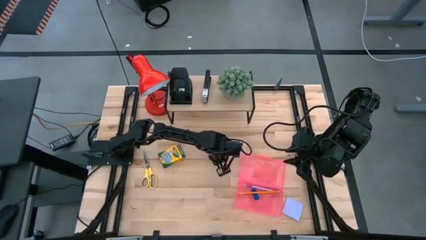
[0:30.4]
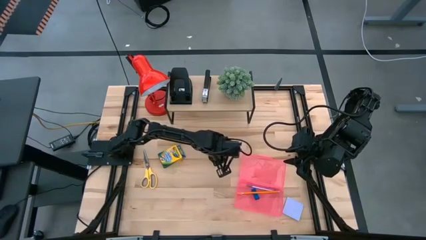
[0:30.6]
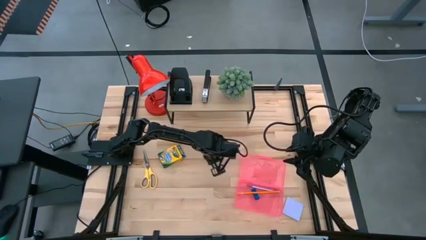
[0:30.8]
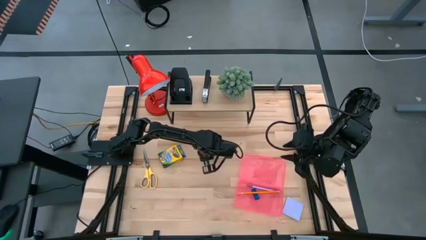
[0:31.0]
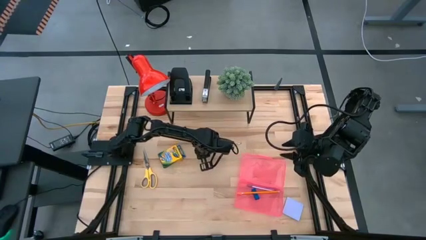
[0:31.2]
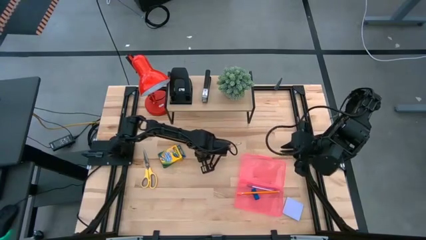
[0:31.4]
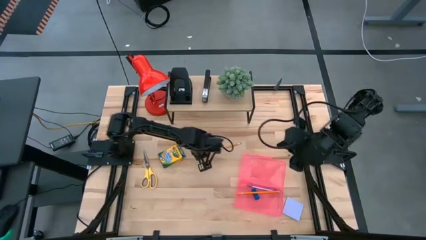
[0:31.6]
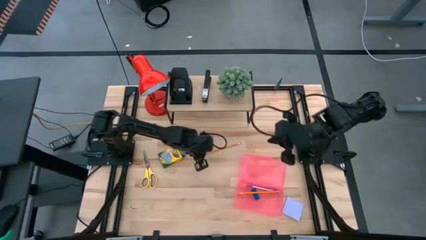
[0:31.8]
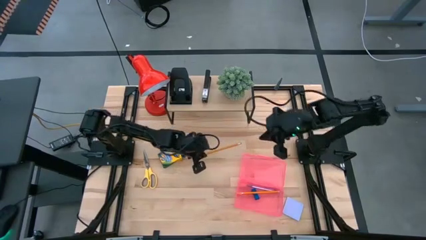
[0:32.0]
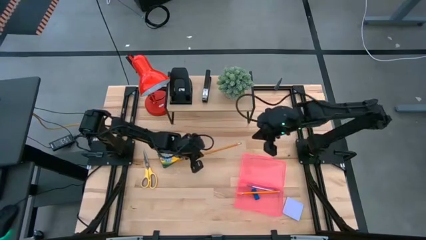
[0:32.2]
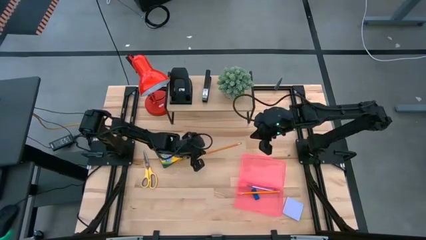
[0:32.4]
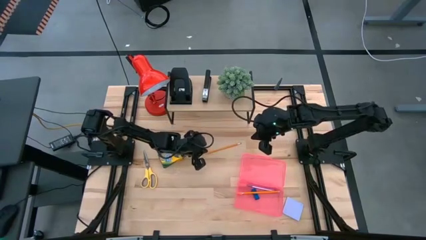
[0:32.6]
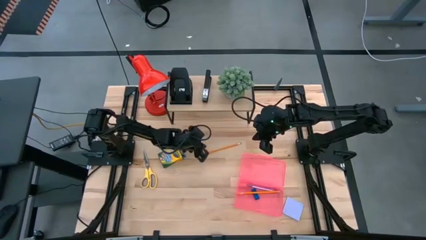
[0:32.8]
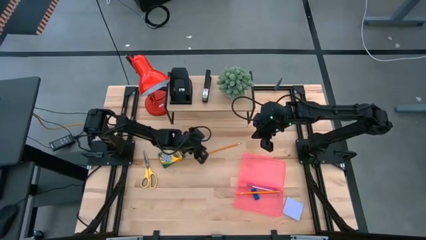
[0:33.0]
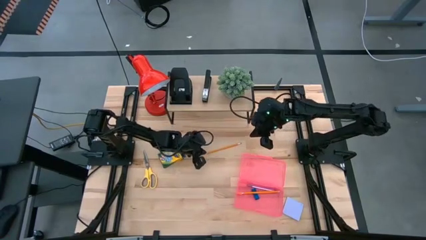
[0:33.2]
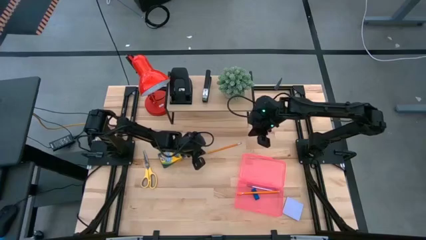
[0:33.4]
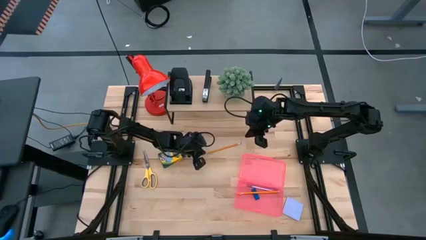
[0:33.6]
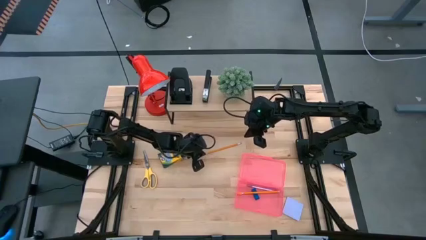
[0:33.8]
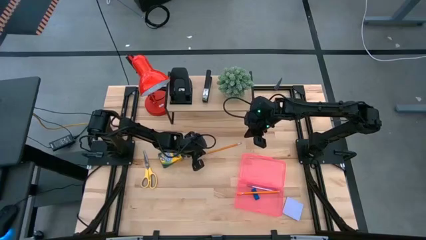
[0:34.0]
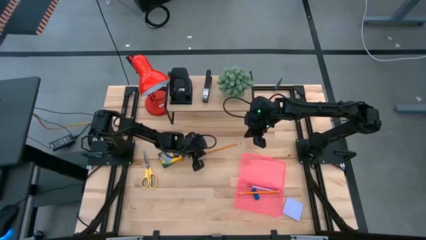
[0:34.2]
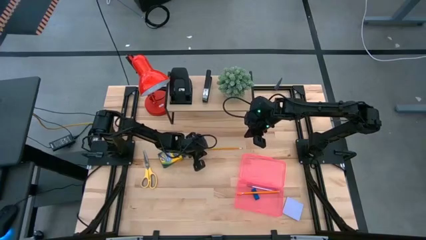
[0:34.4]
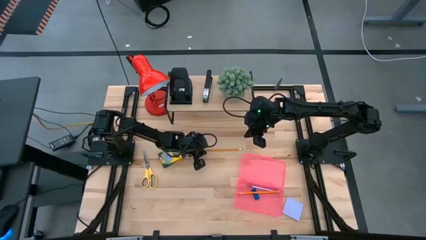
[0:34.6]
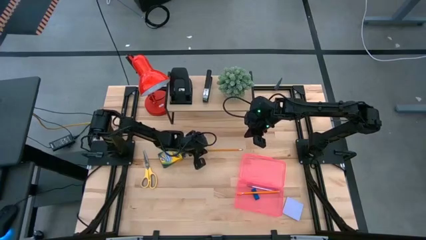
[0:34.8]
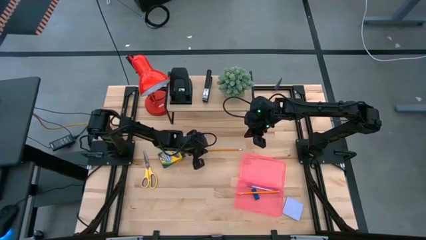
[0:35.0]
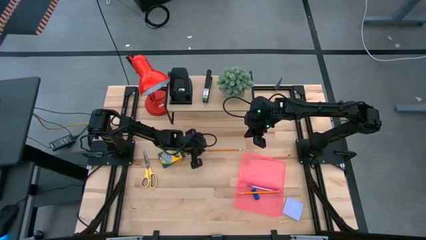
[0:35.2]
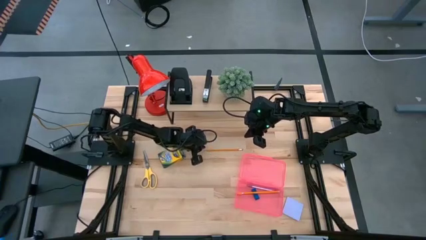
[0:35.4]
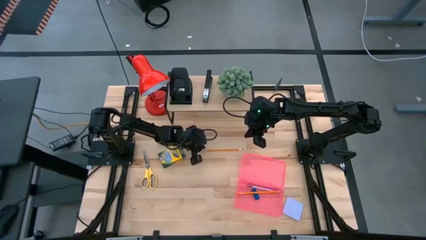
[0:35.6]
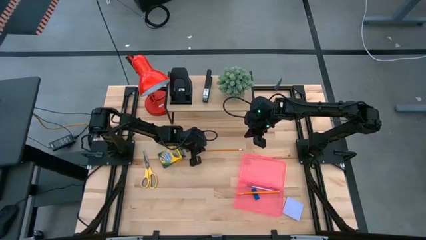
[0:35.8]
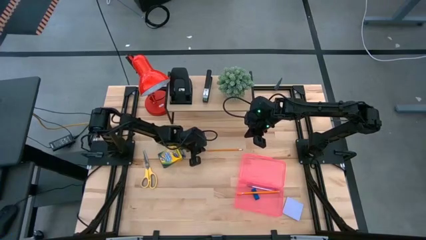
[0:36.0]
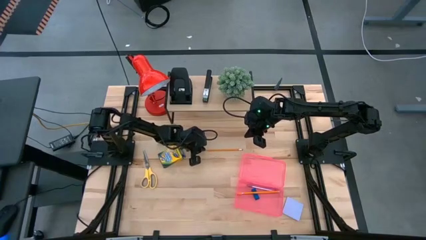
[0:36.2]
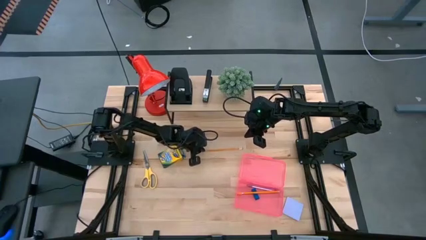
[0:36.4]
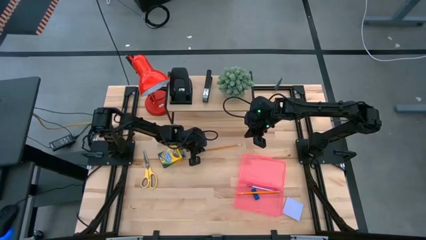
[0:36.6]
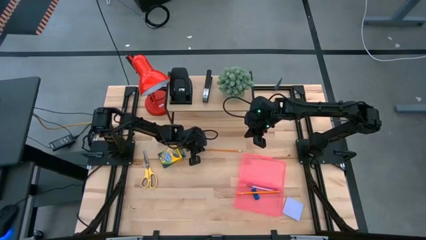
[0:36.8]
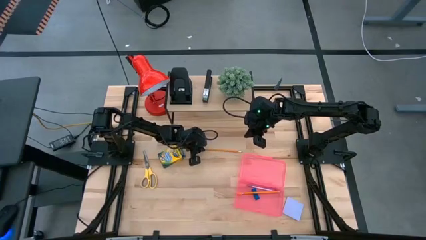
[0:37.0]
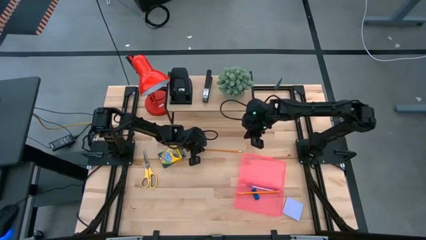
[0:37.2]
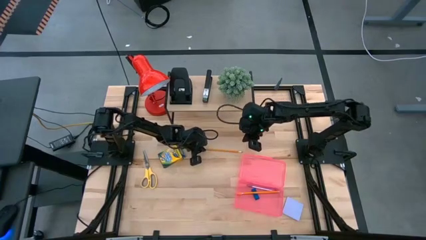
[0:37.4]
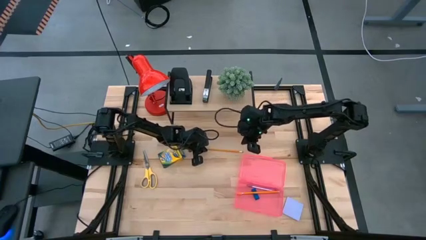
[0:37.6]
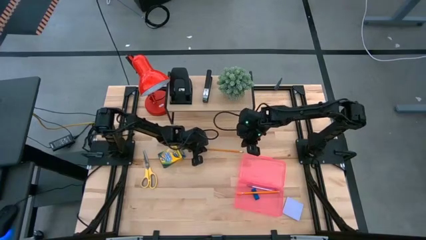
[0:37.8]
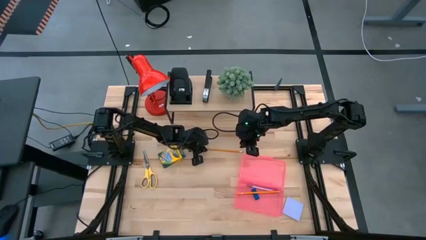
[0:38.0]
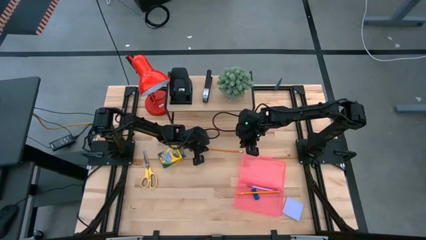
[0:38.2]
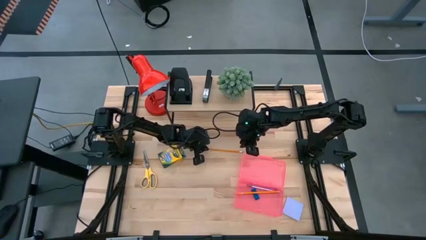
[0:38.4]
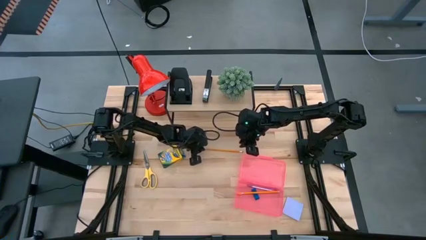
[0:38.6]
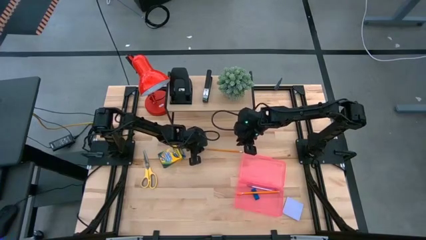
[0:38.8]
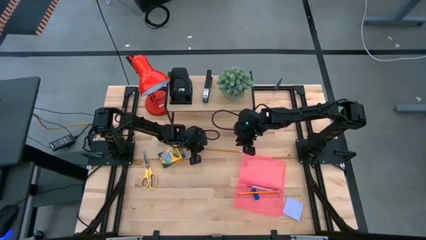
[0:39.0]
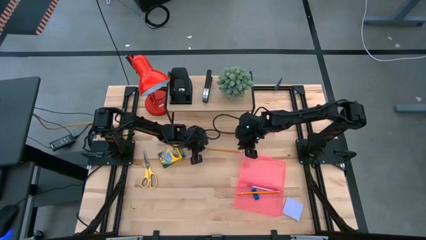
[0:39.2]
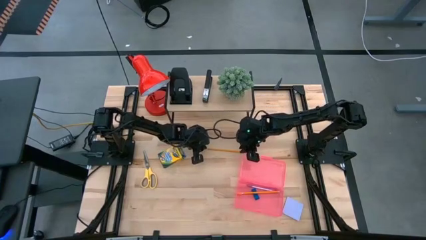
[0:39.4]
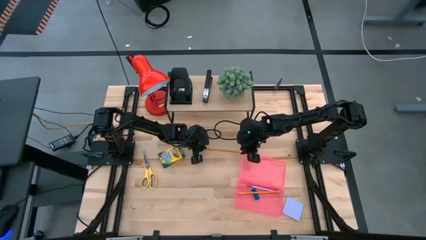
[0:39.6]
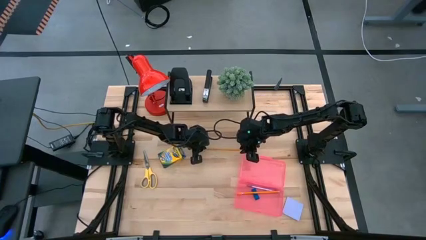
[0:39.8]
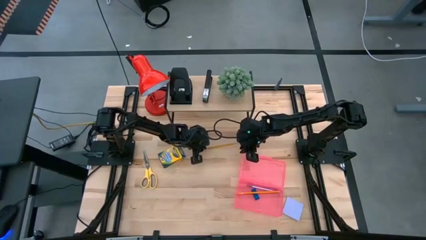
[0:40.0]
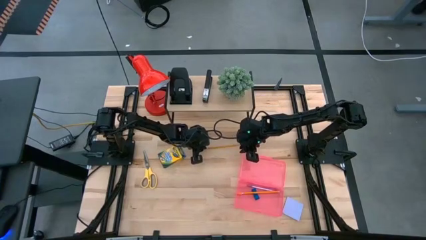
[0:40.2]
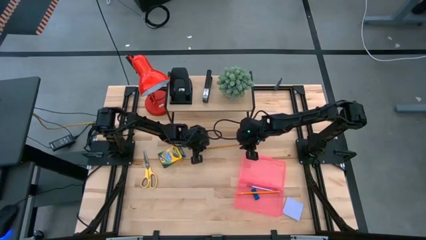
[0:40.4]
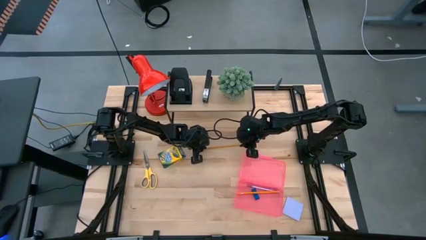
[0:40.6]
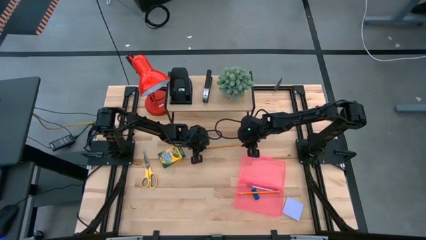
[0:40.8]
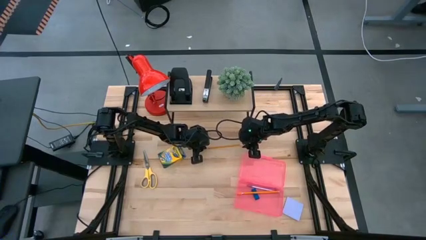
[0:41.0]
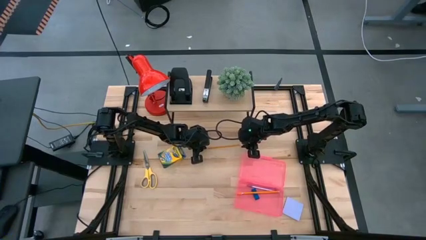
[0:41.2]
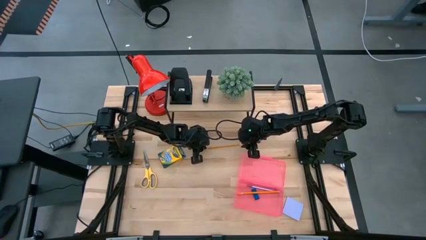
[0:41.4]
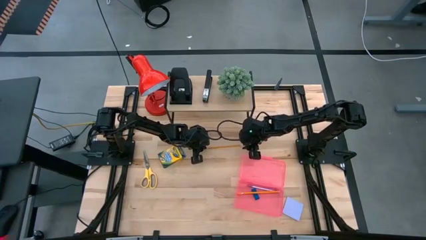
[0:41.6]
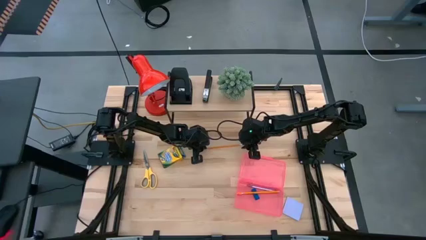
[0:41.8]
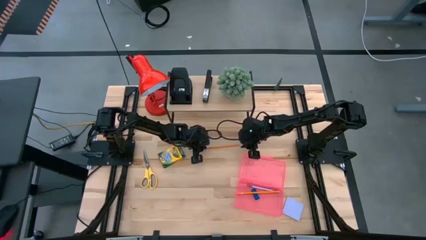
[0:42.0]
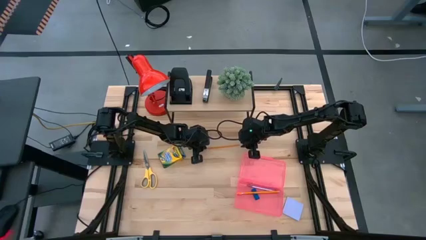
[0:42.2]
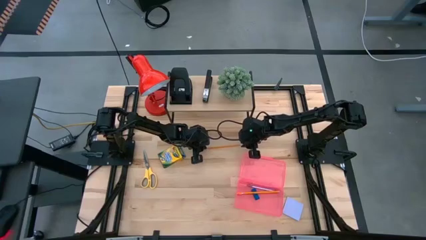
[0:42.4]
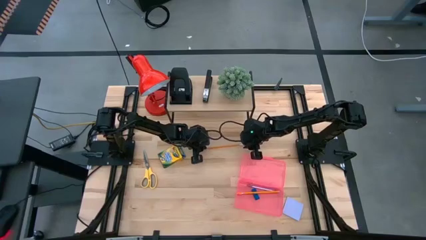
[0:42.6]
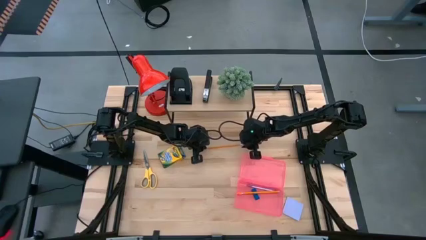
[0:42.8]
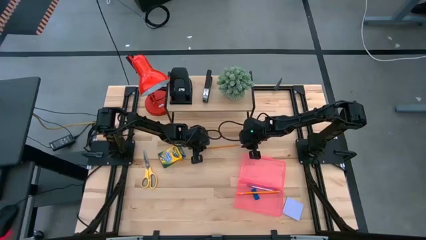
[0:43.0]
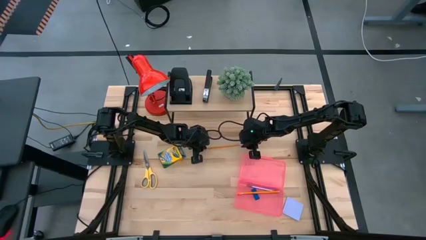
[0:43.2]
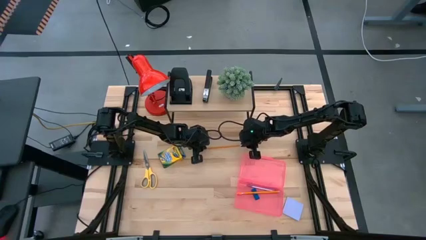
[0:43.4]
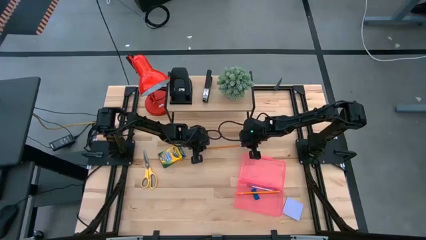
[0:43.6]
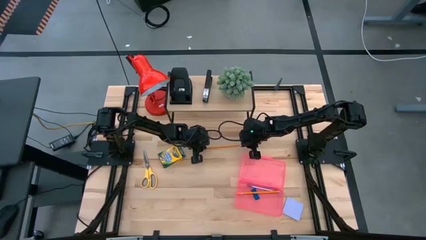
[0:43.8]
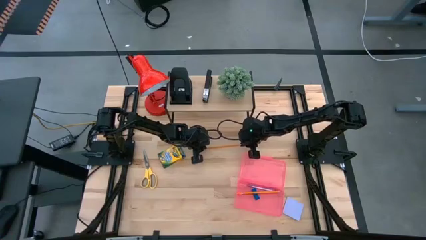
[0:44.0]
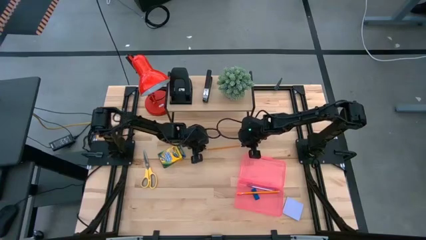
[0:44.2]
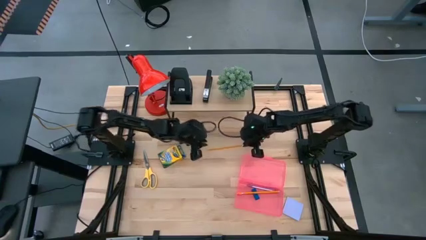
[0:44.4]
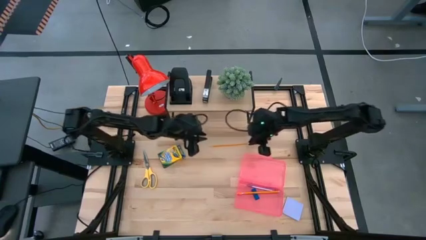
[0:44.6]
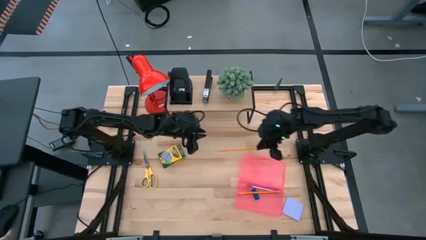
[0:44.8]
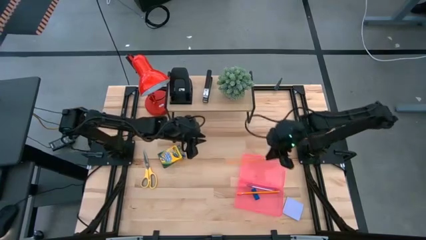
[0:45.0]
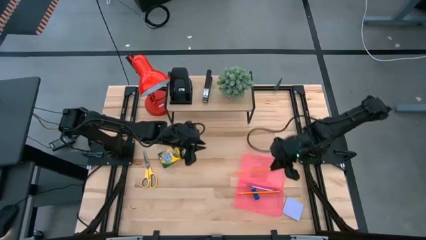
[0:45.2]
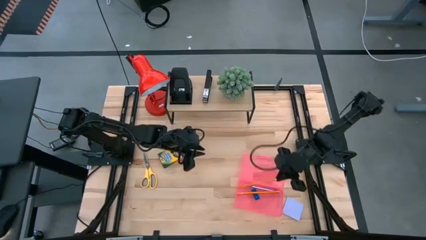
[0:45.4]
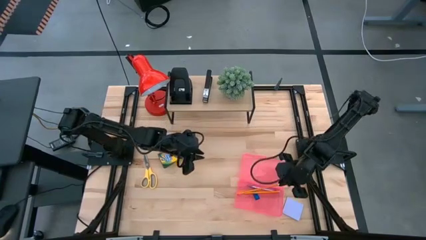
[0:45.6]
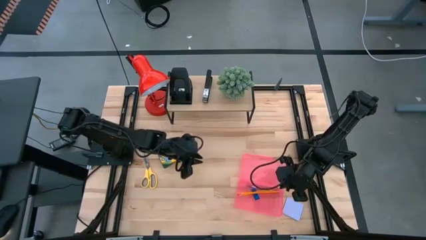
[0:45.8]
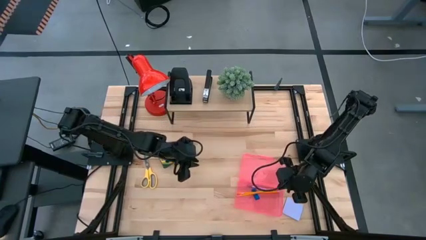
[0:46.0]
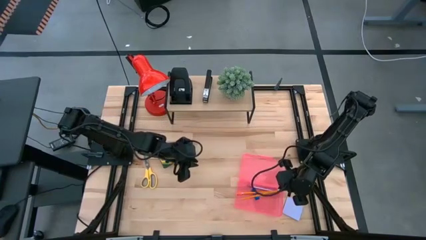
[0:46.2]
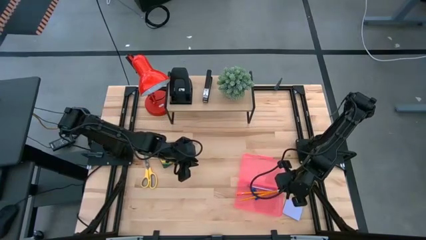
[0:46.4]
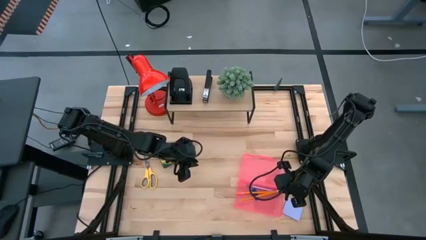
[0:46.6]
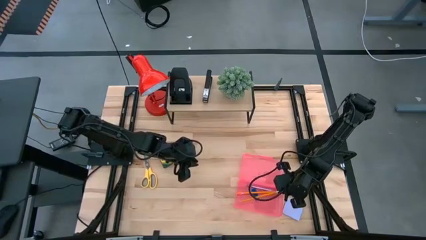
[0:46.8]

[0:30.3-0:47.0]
Task: Pack school essentials
Put the orange pencil into the pink supply box

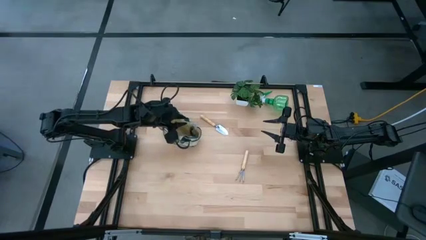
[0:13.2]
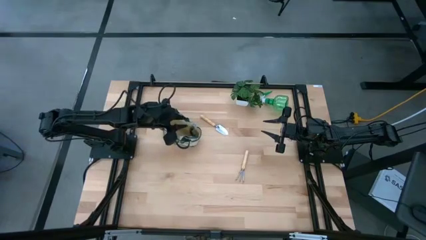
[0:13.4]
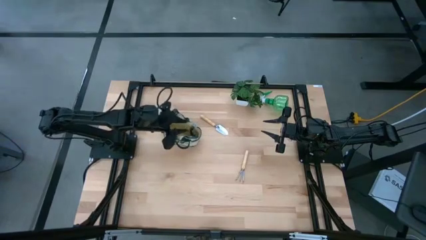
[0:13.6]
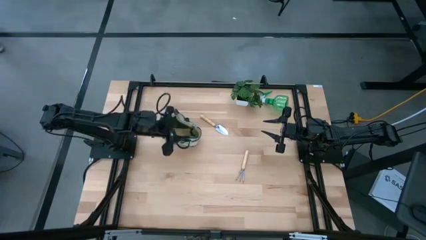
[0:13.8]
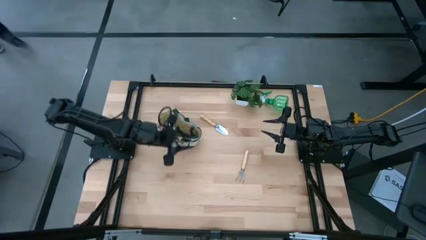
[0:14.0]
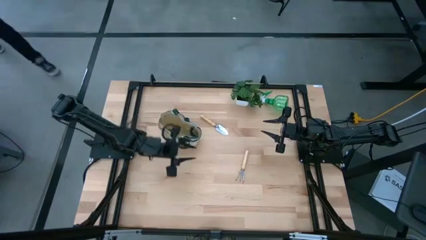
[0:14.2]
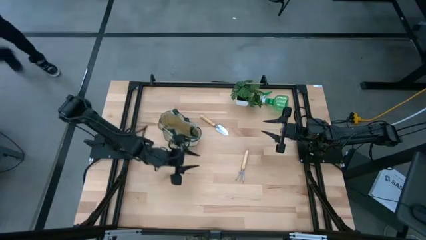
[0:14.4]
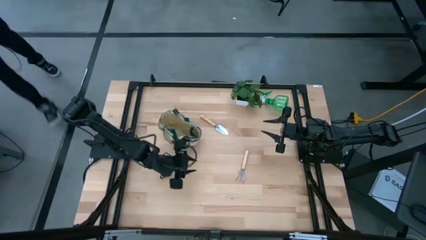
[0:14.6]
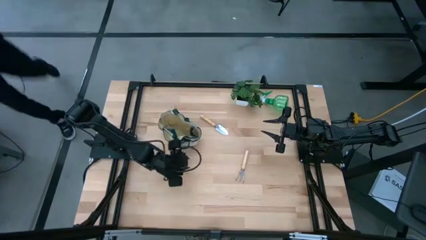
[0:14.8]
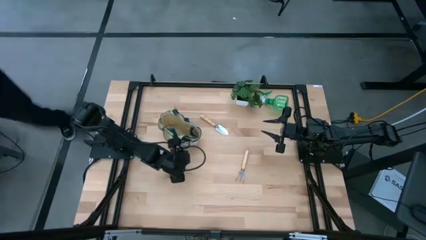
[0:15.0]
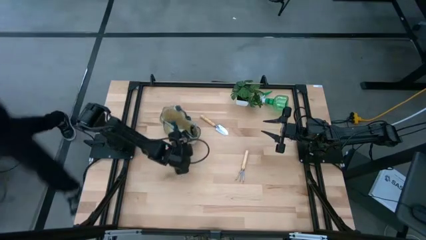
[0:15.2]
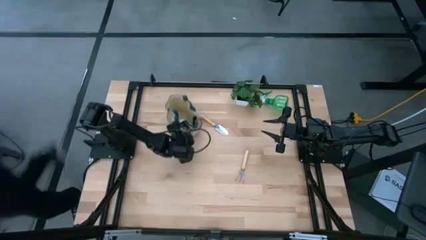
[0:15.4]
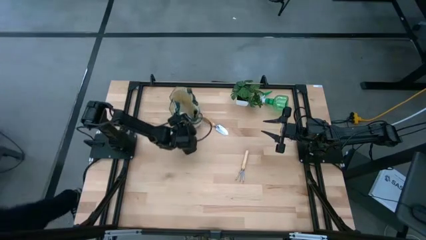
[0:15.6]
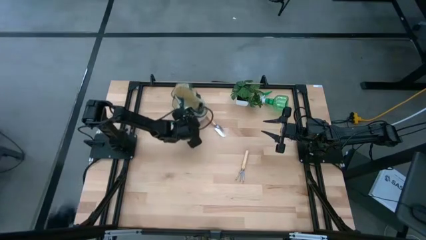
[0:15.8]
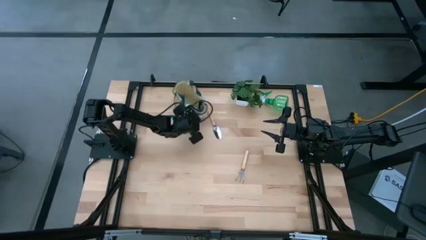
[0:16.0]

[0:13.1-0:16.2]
Task: Pick & Place Garden tools in Gardening bag
Adjust the gardening bag
